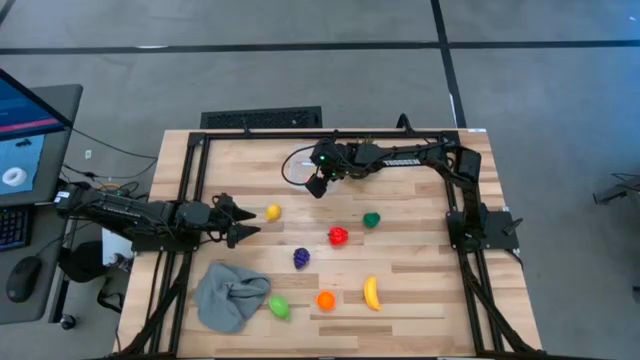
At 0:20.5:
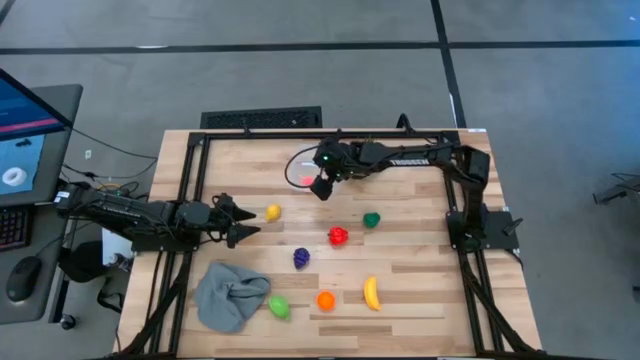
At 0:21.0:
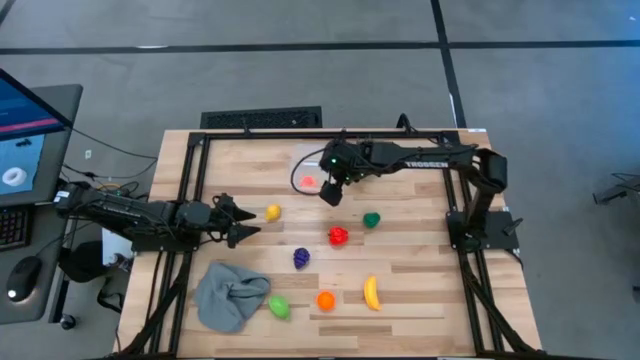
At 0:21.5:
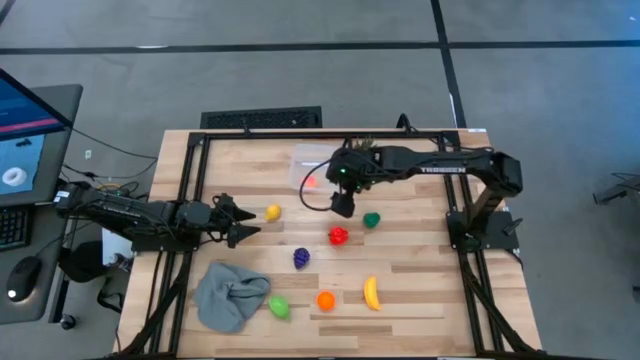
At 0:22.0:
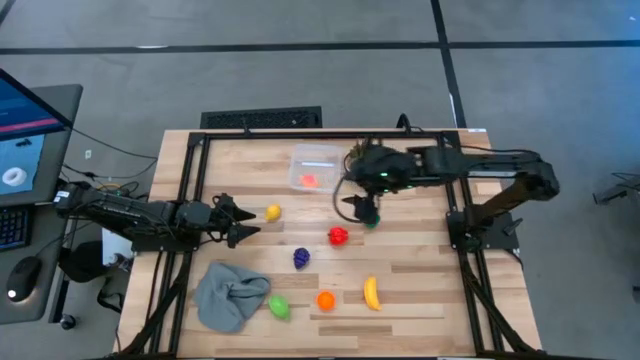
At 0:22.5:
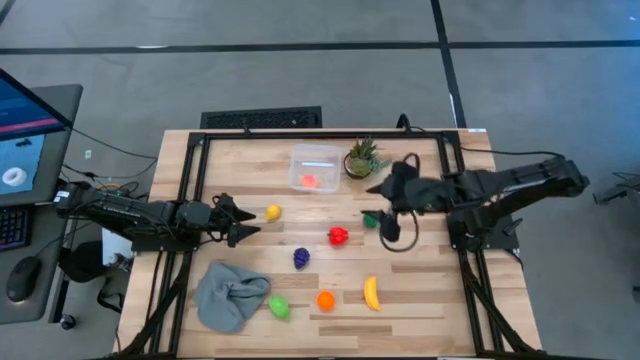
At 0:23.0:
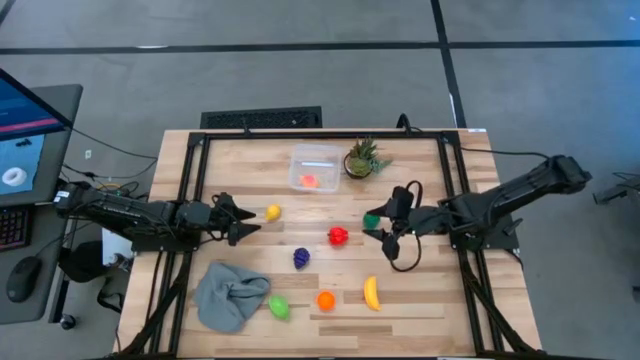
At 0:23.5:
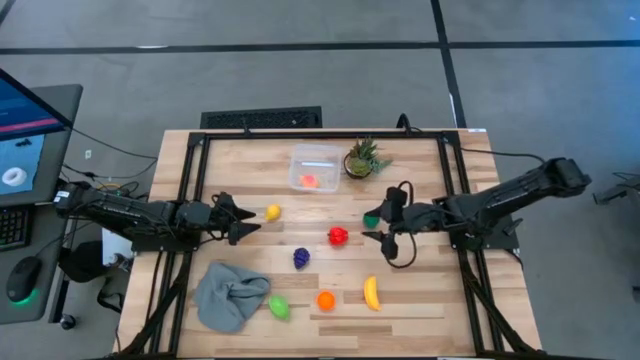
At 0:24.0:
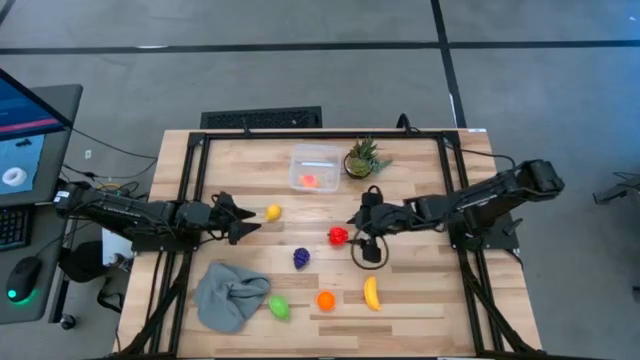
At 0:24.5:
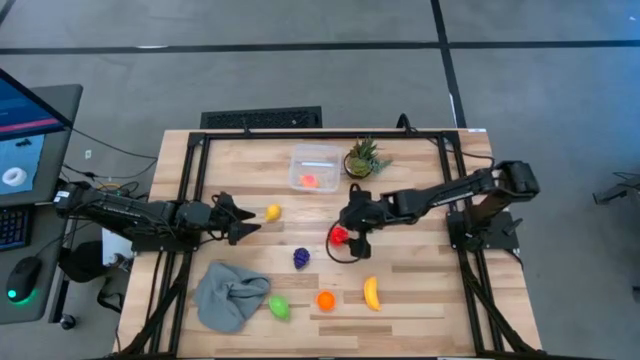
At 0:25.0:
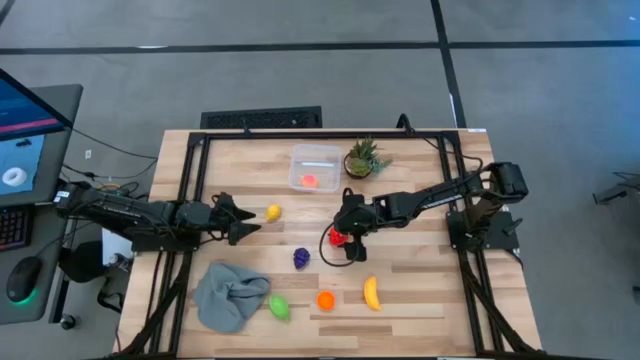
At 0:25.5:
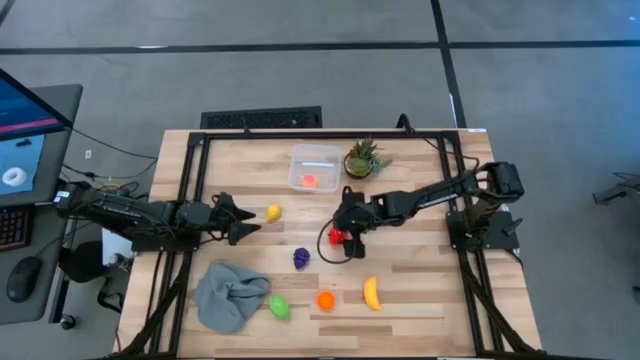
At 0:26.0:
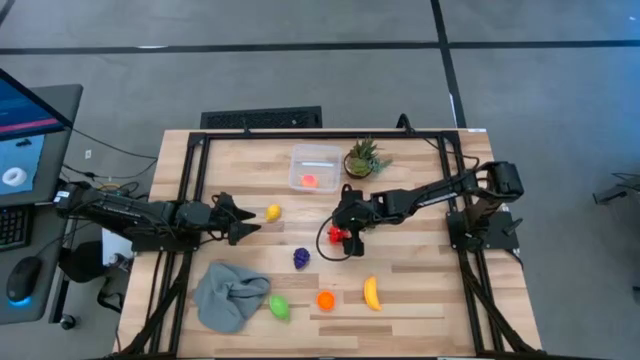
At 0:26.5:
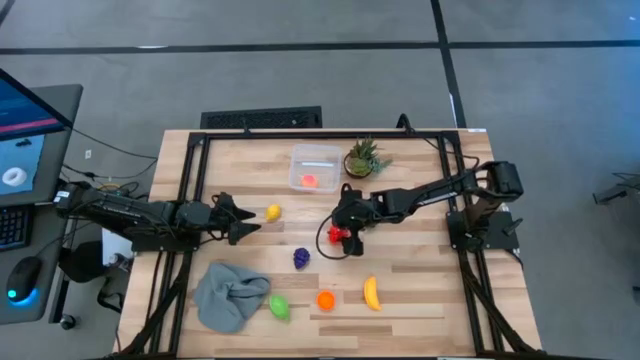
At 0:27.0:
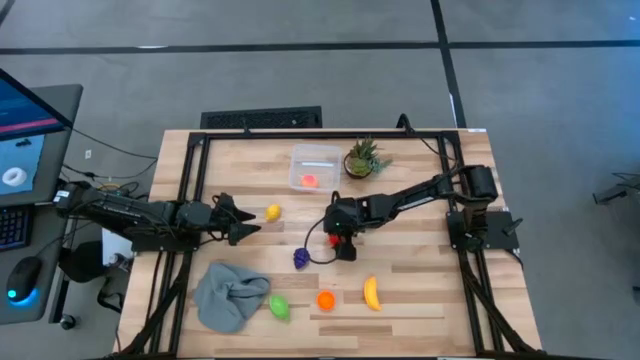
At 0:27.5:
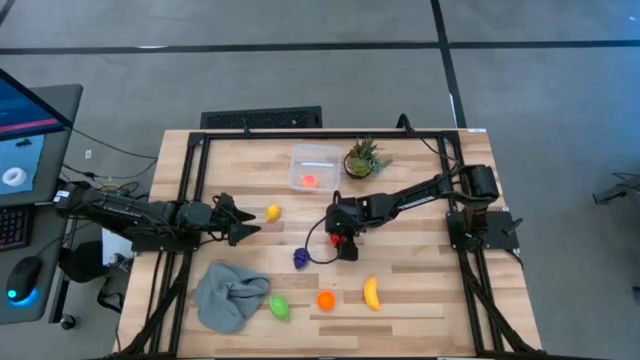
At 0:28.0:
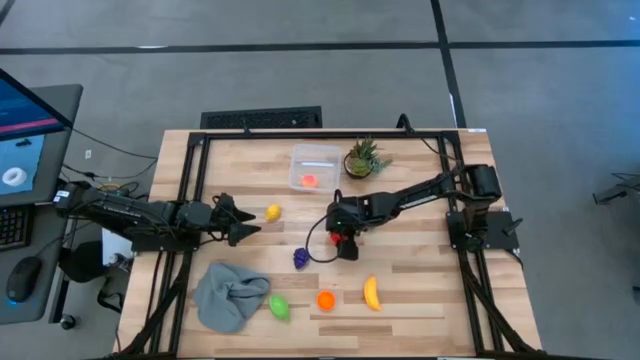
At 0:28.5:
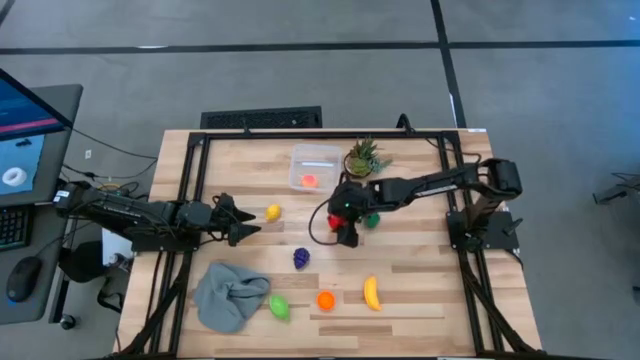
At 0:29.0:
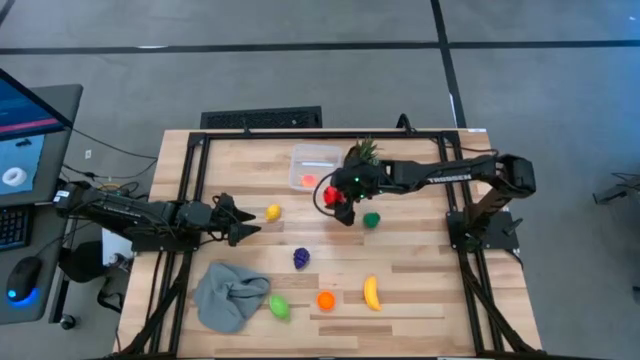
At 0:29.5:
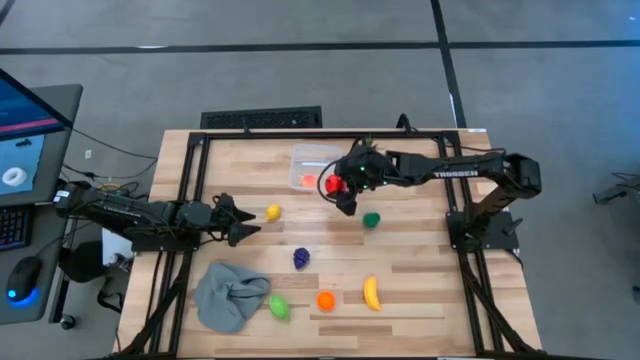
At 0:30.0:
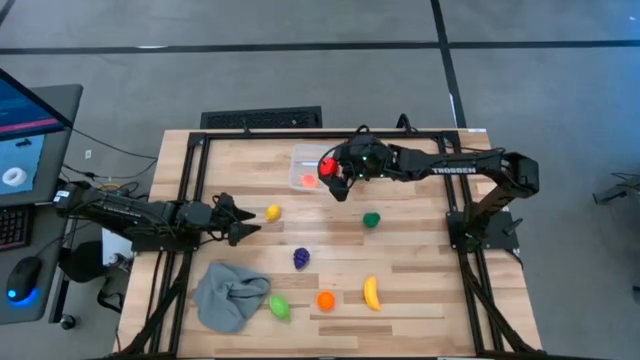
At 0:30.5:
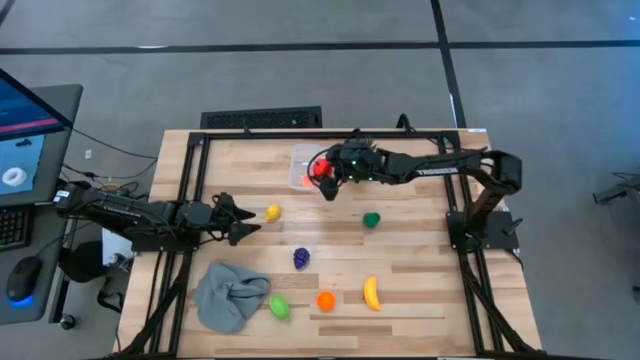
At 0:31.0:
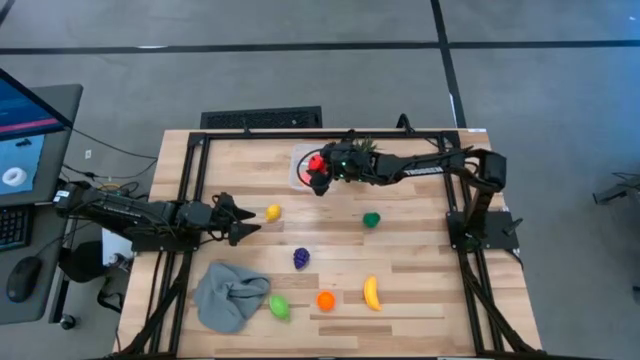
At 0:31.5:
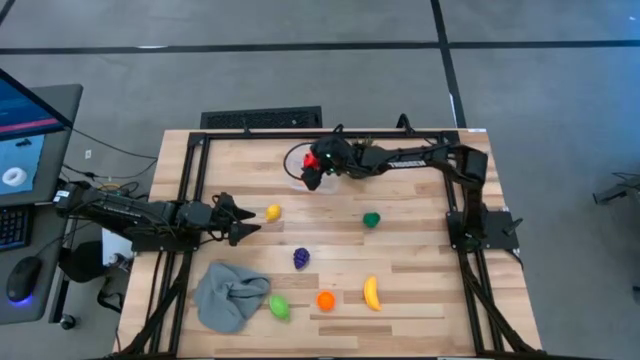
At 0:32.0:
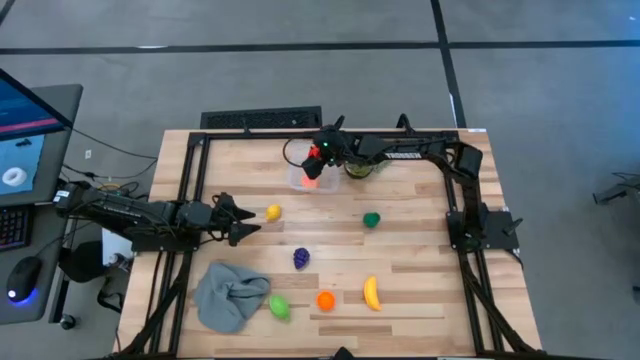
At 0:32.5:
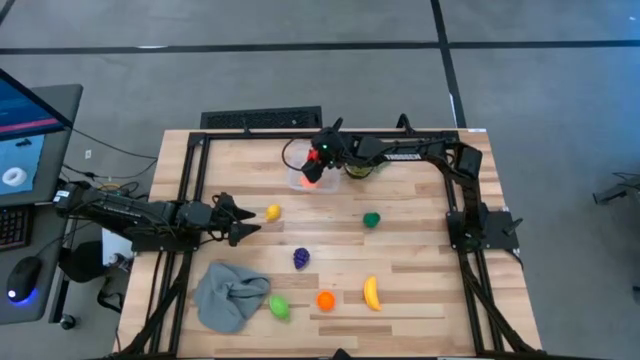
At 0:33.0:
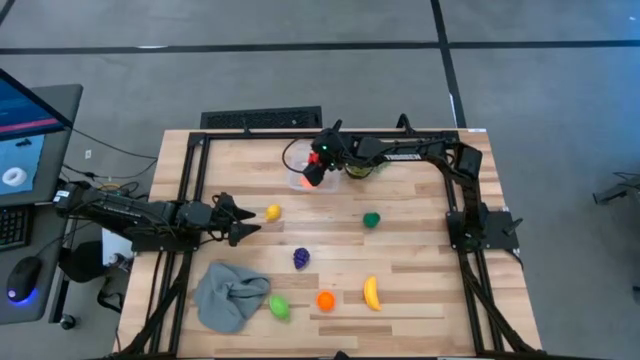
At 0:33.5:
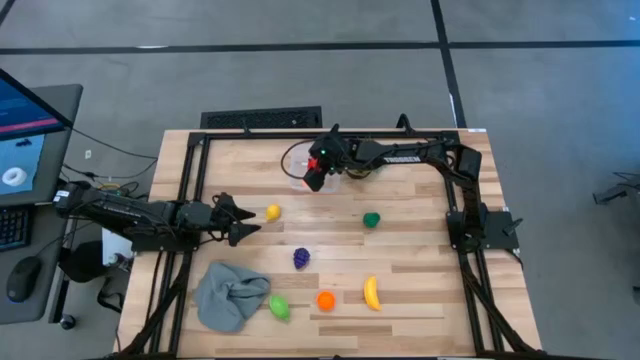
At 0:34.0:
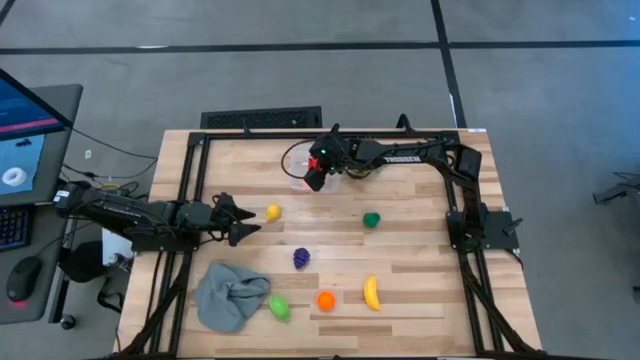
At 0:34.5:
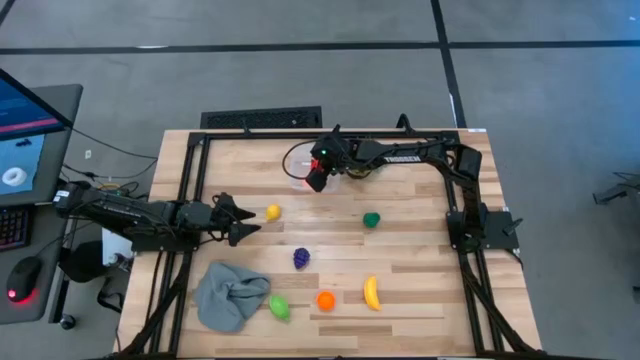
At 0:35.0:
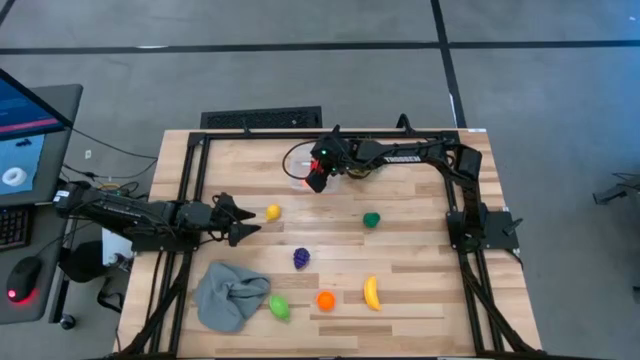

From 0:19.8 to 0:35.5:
Task: Pick and placing Produce into tupperware
Put the red apple into the transparent container

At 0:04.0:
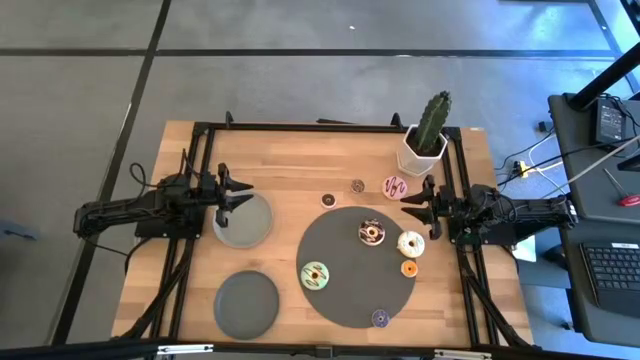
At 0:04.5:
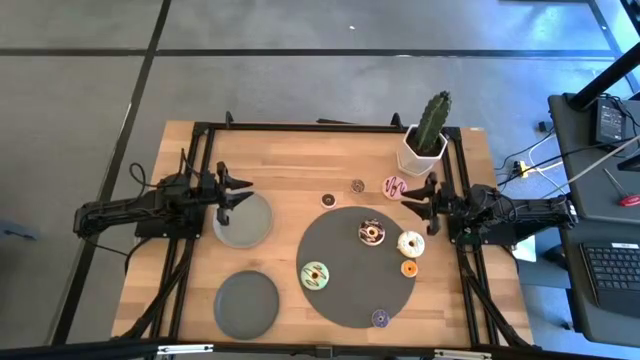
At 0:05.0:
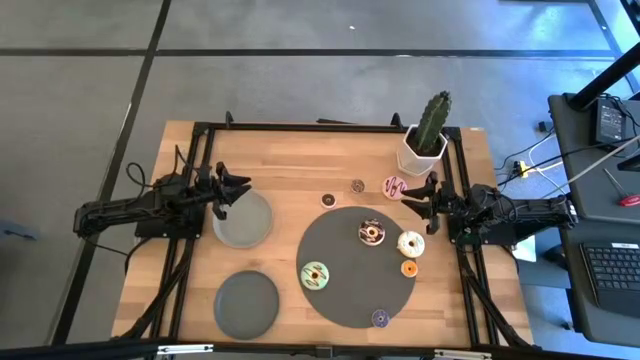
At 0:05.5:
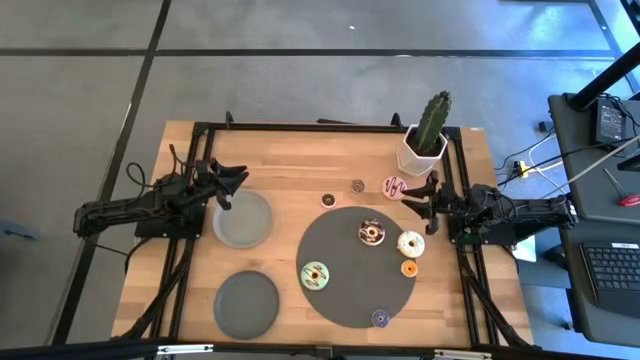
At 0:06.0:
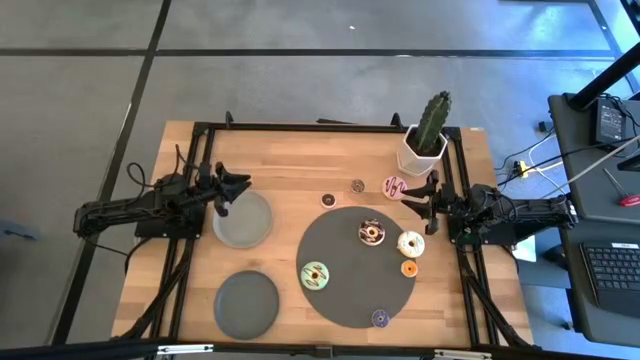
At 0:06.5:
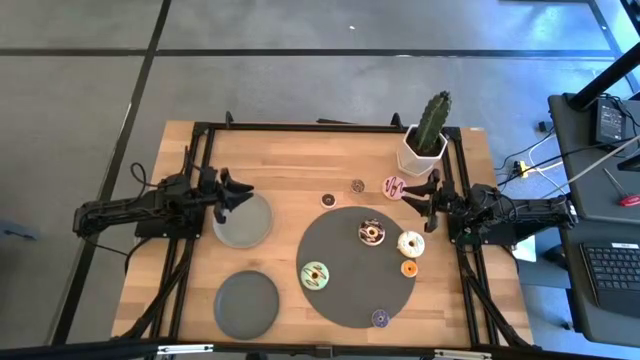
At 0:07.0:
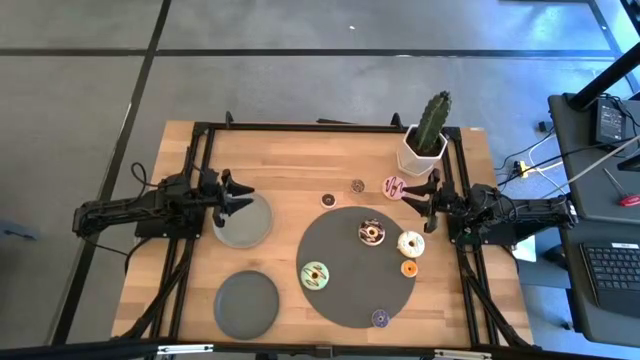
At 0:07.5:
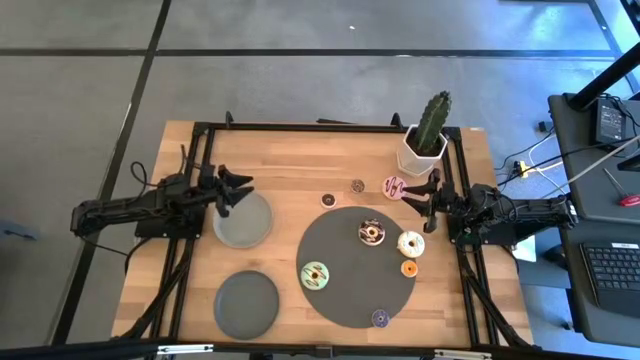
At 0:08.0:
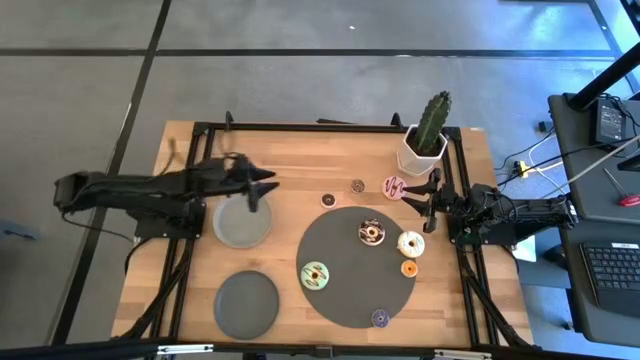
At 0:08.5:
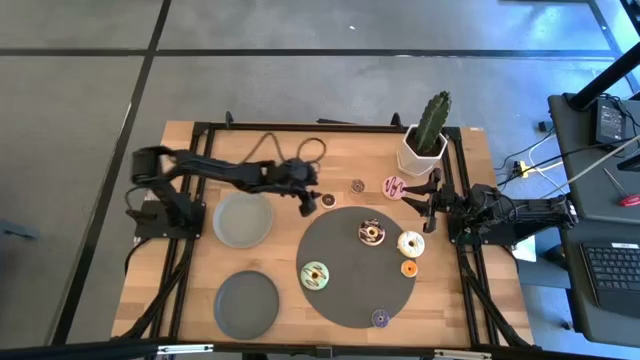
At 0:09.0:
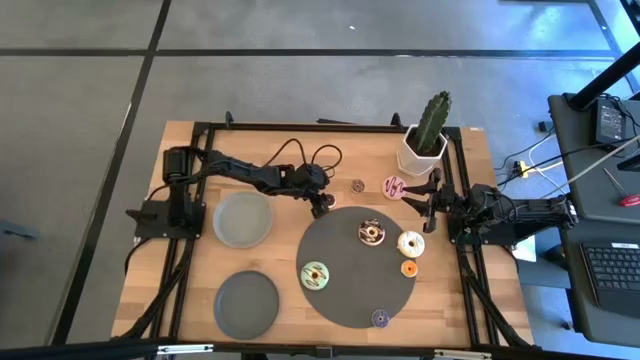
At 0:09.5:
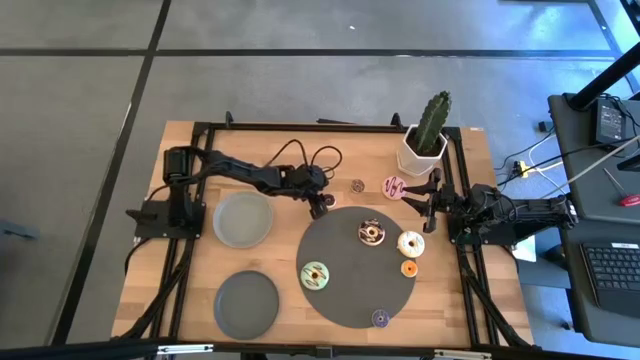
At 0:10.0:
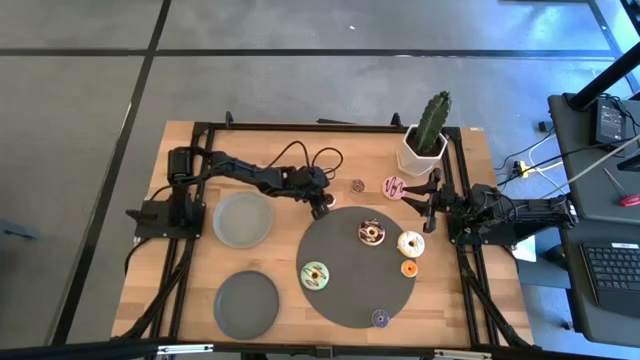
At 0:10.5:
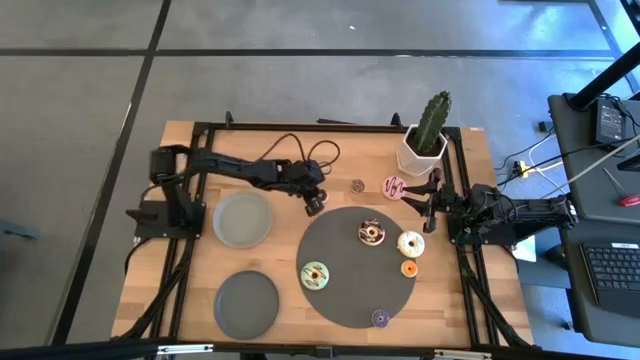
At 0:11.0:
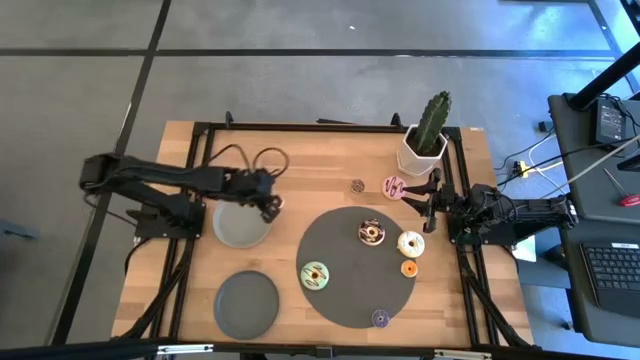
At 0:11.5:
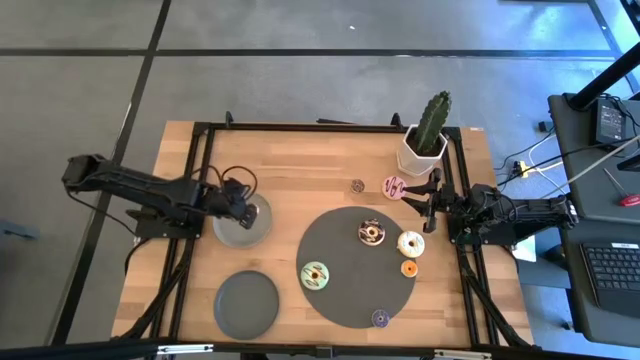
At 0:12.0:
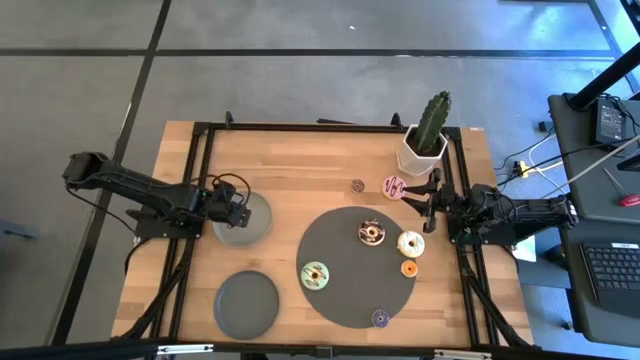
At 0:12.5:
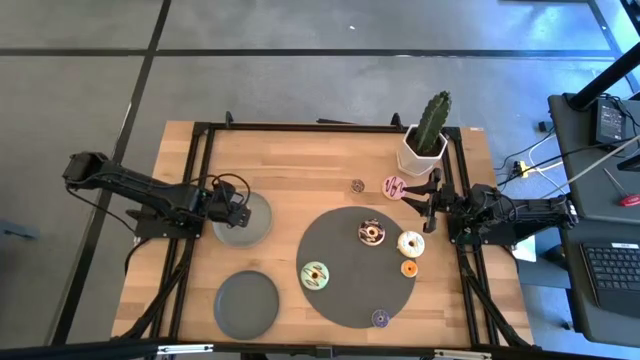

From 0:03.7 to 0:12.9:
Task: Pick & Place donuts
Put the small dark brown donut on the gray plate
